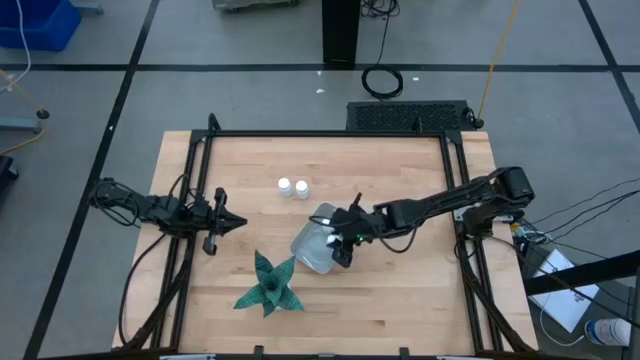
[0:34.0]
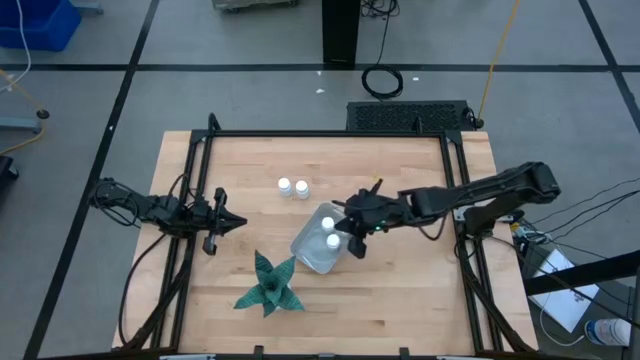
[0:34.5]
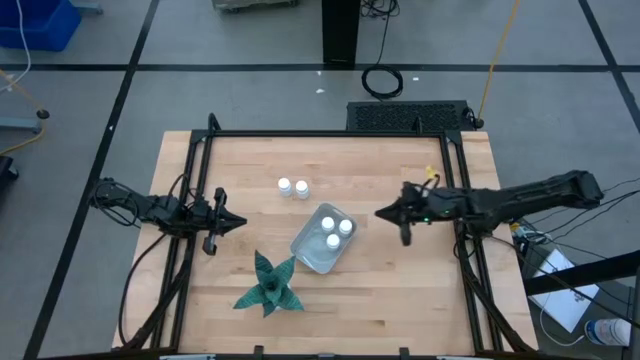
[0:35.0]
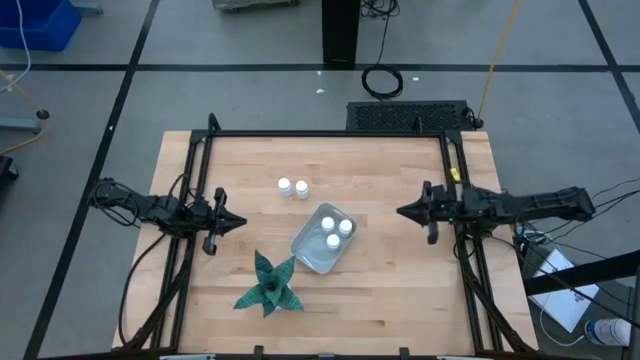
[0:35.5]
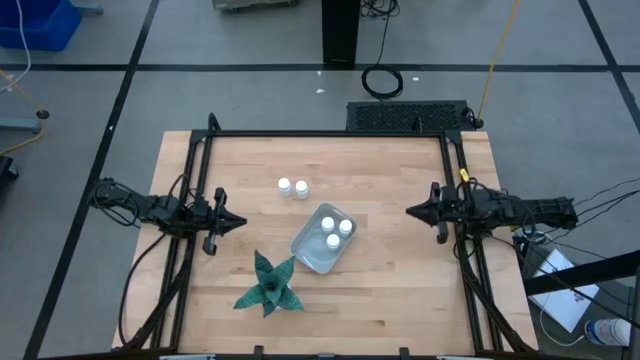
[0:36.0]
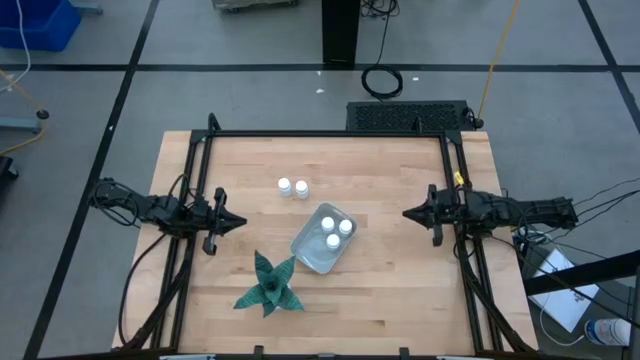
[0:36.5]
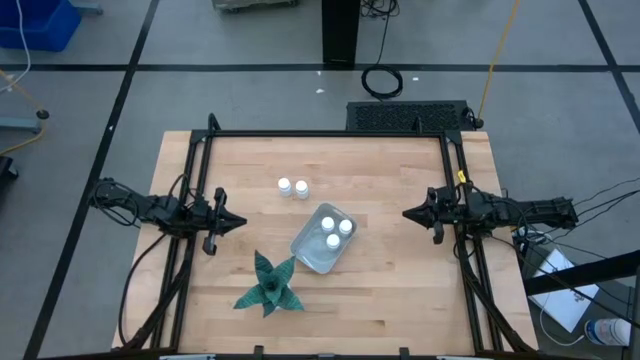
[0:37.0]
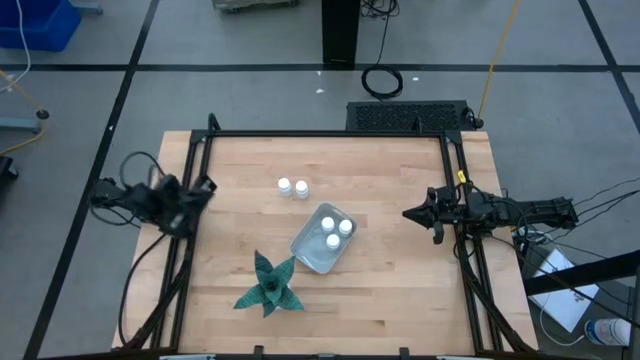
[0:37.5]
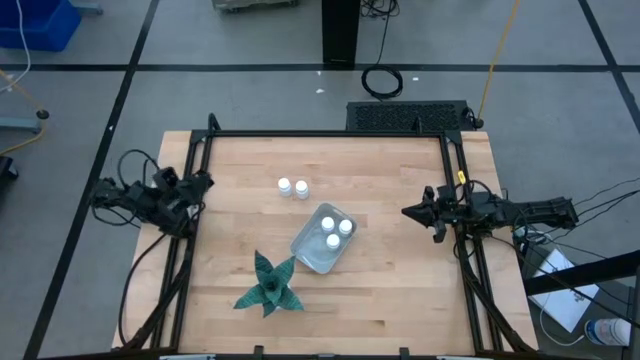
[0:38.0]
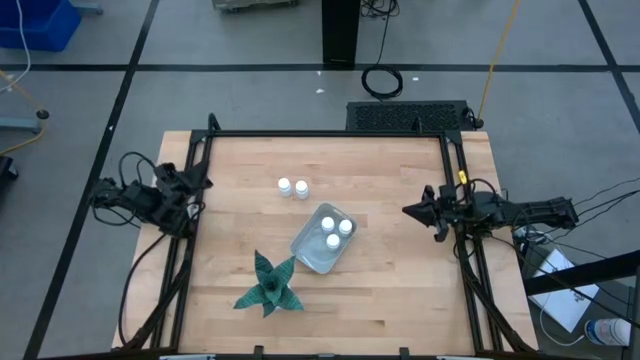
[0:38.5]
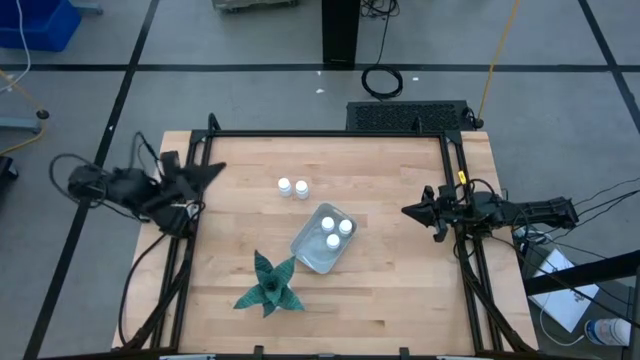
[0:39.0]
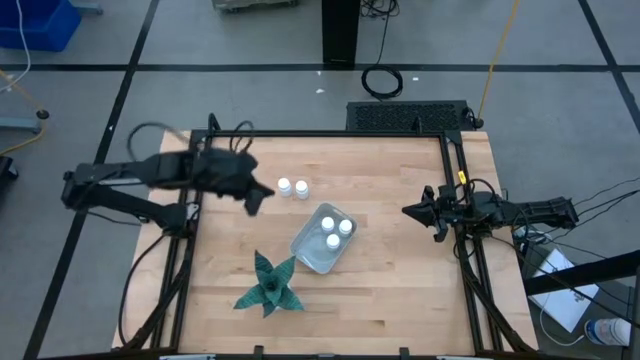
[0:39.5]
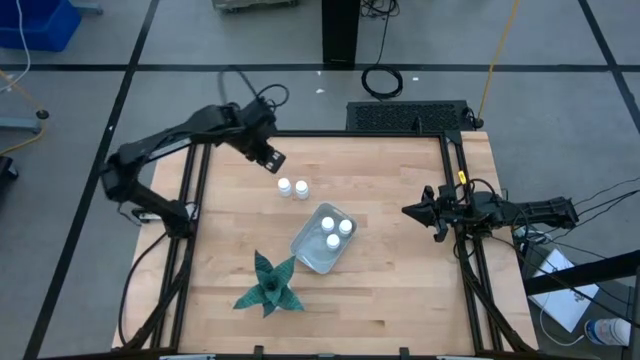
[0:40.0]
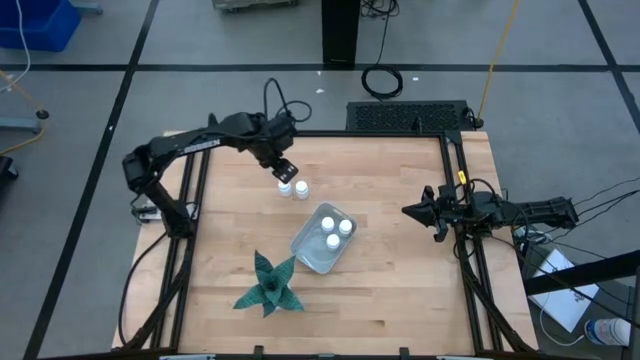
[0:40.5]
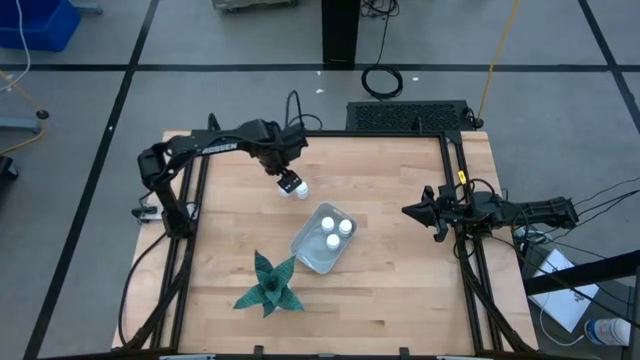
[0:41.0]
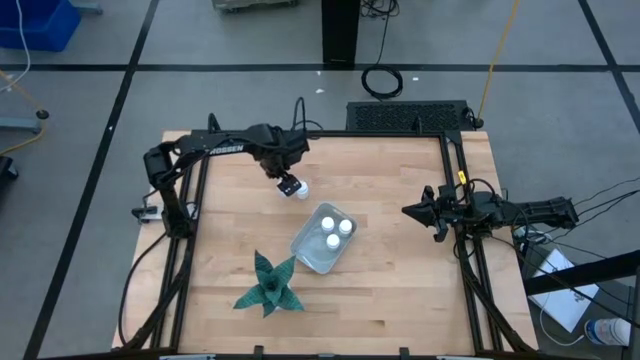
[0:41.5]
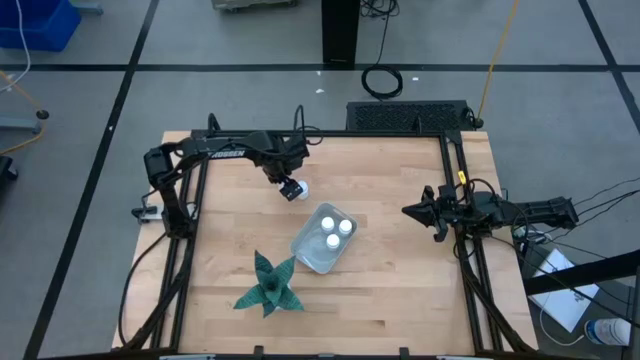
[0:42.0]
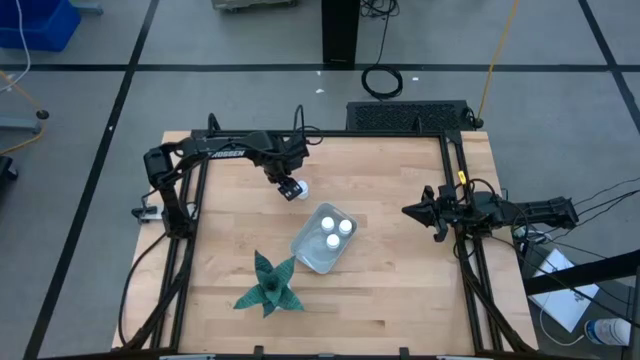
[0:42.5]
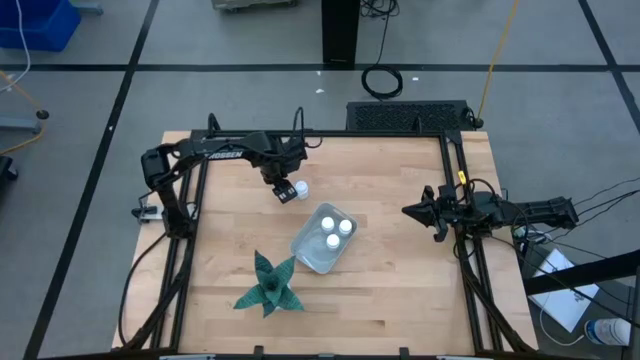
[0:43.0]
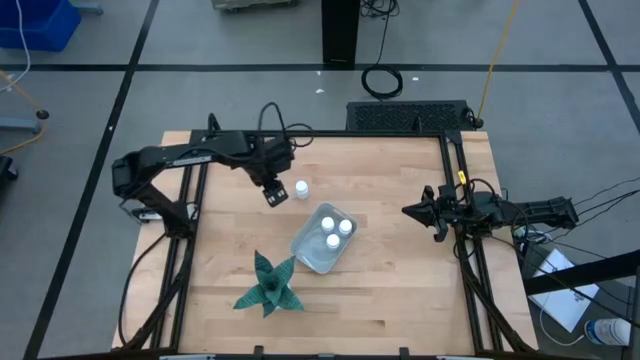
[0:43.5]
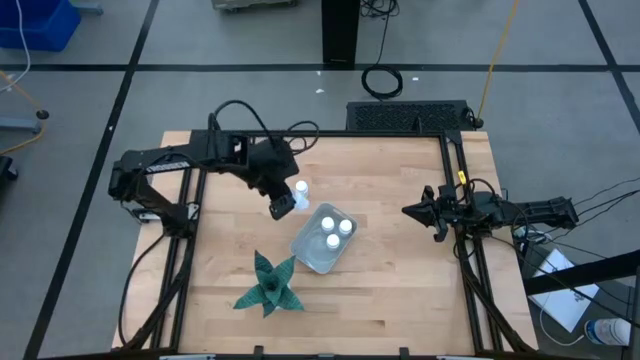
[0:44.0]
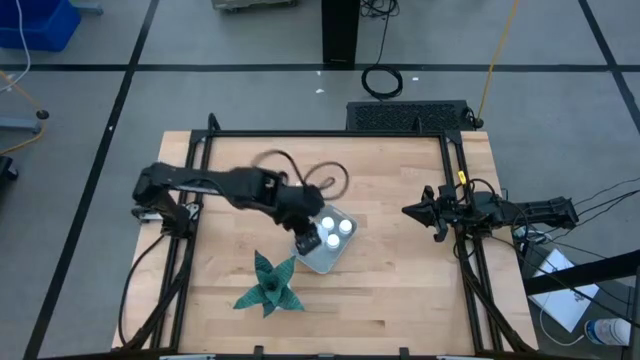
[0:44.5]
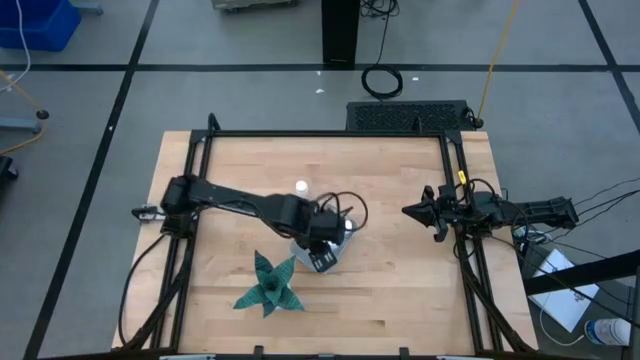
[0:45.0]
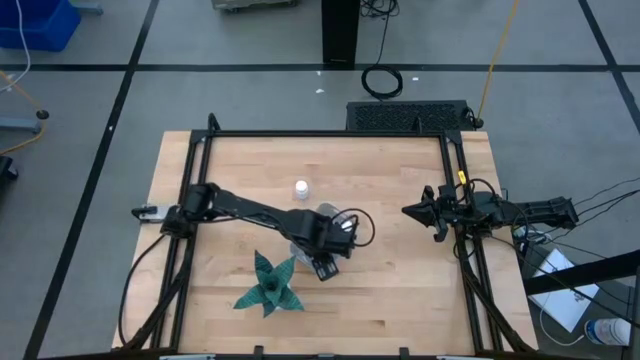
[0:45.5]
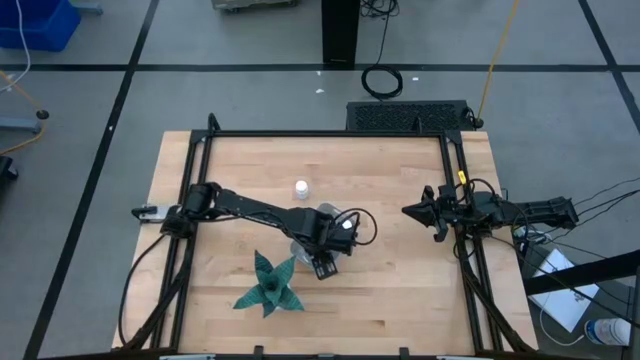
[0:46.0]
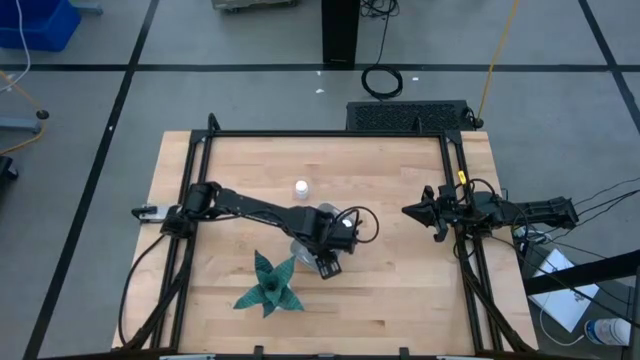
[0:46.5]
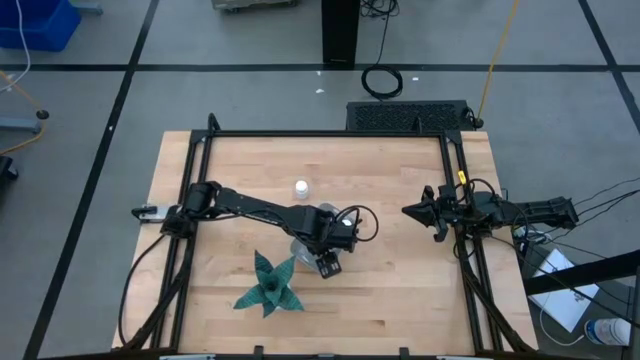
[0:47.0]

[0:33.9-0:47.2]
Task: Pick and place pill bottles into a basket
Put the white pill bottle into the gray bin

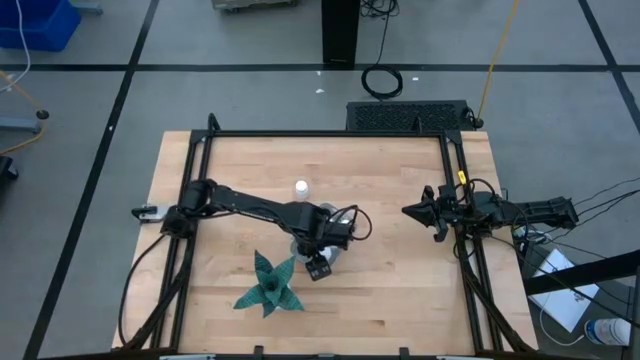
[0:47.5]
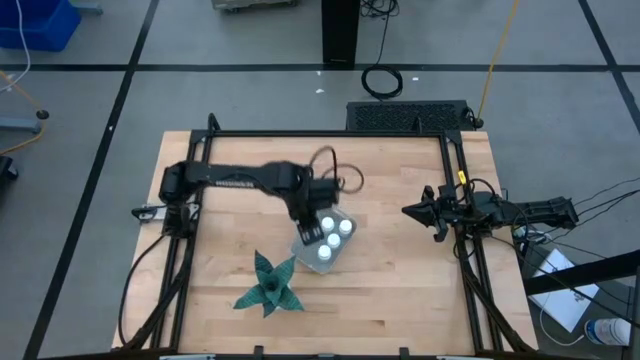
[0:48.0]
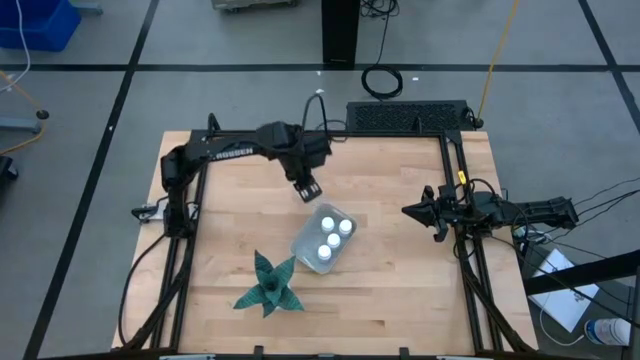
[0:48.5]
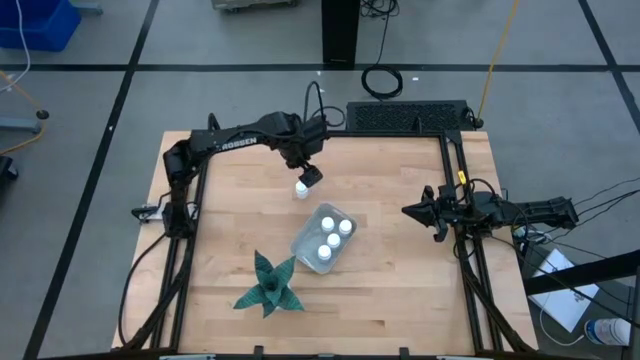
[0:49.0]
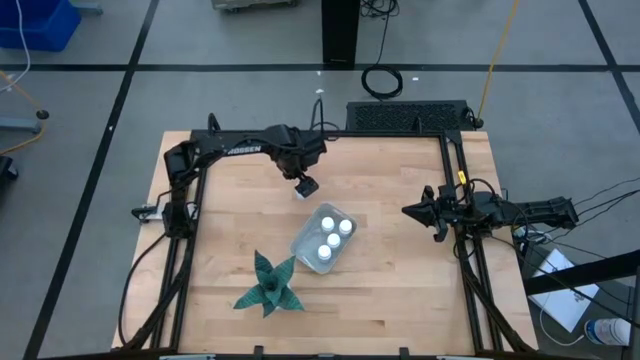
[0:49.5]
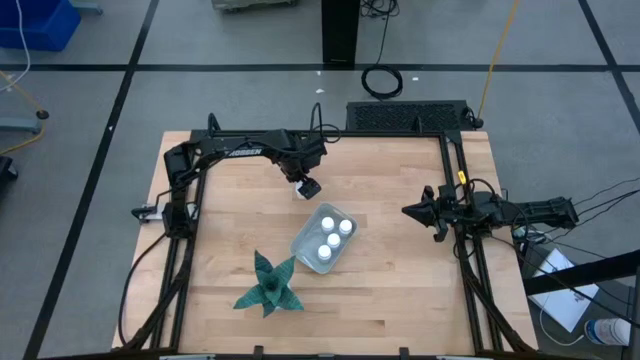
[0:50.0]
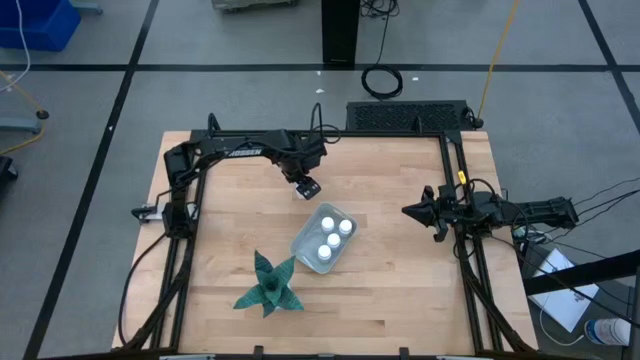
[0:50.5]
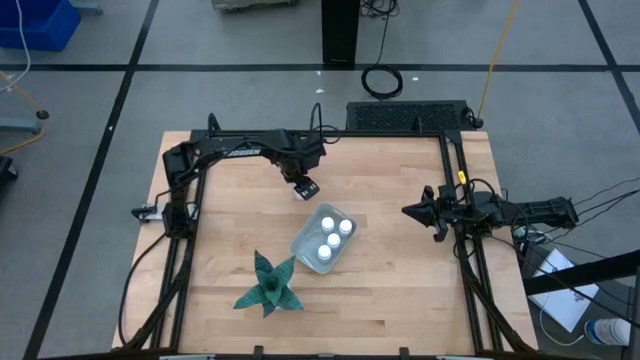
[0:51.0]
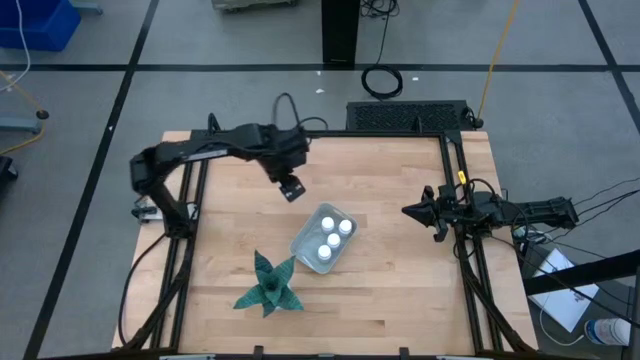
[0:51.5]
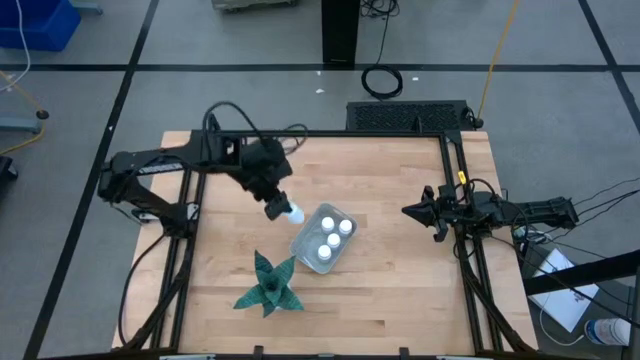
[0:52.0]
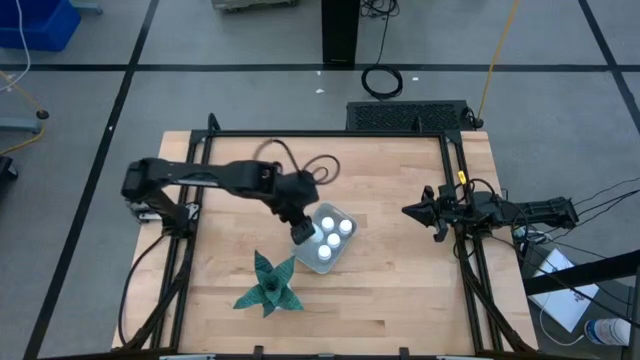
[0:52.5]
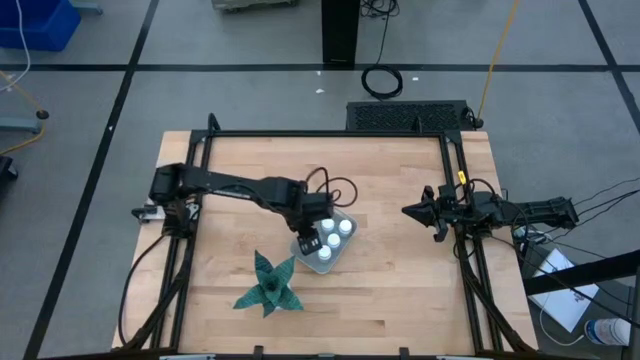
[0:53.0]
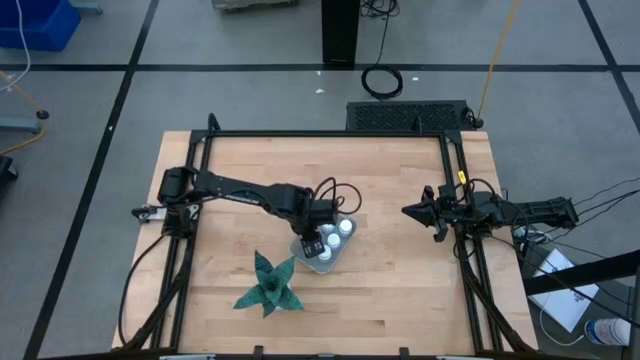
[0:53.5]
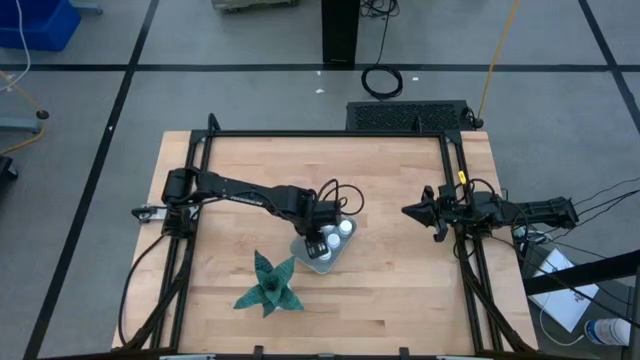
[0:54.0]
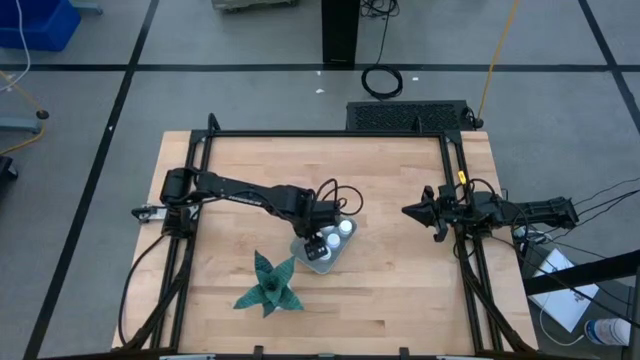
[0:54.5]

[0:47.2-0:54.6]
Put the white pill bottle into the gray bin
